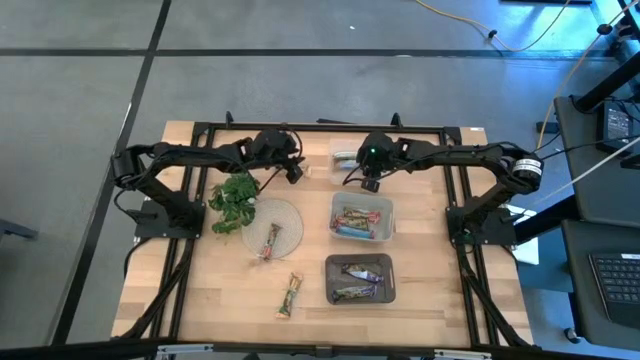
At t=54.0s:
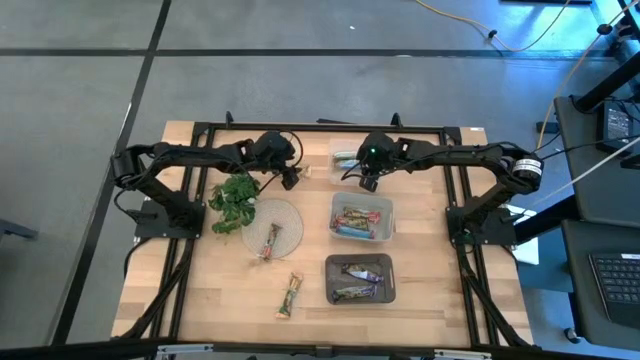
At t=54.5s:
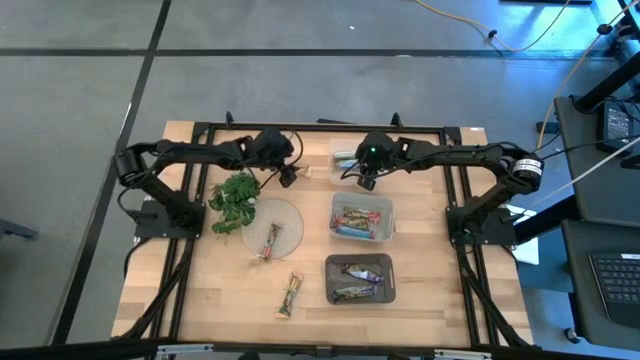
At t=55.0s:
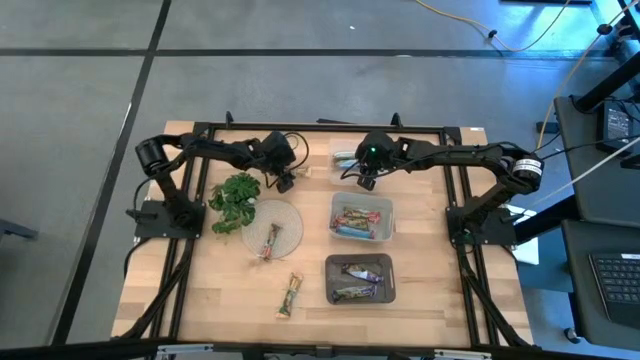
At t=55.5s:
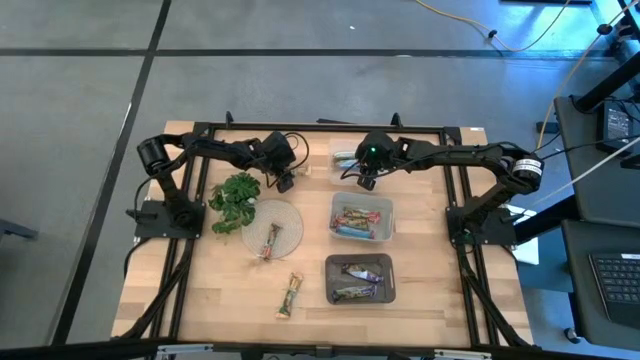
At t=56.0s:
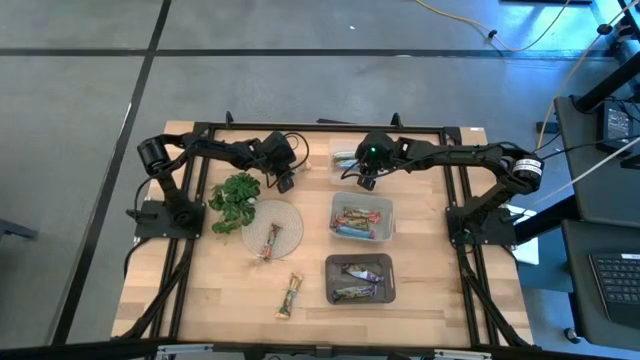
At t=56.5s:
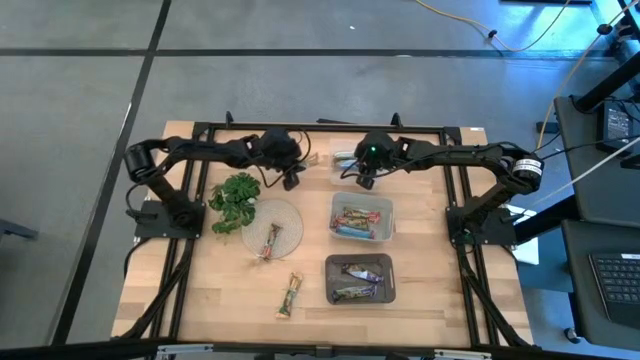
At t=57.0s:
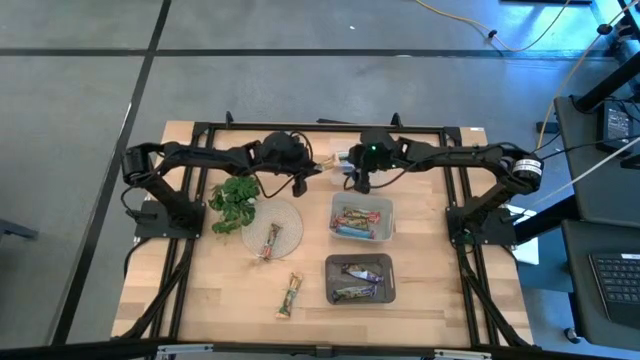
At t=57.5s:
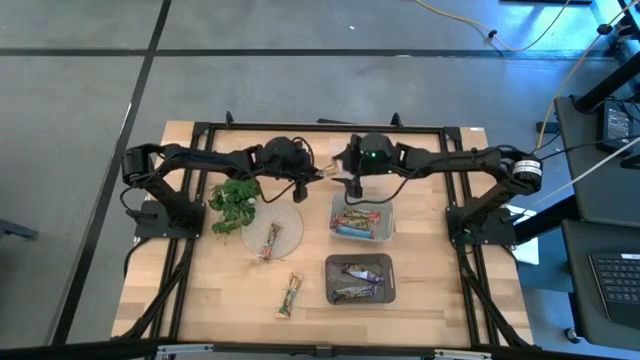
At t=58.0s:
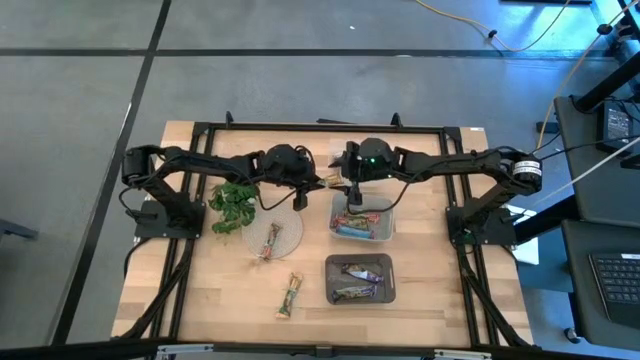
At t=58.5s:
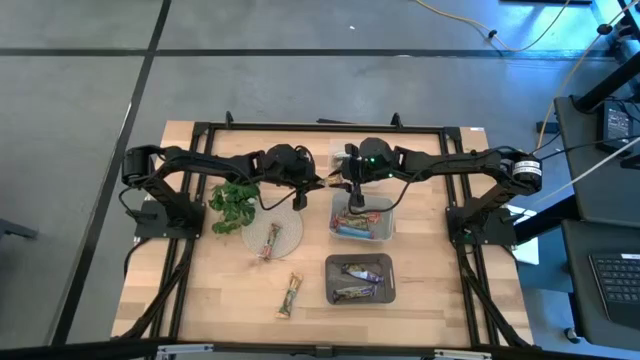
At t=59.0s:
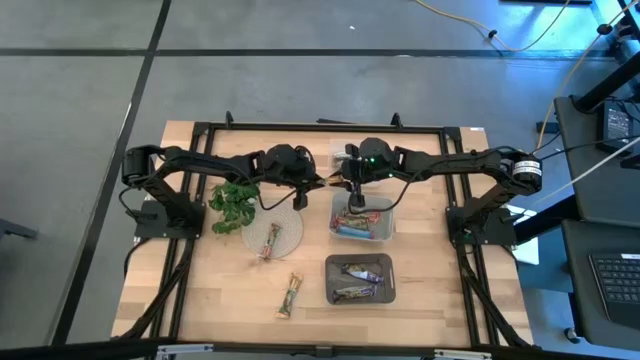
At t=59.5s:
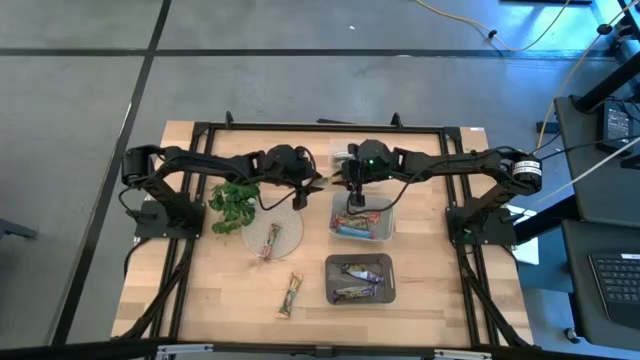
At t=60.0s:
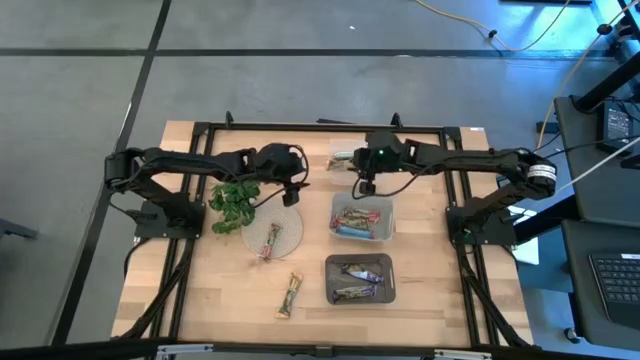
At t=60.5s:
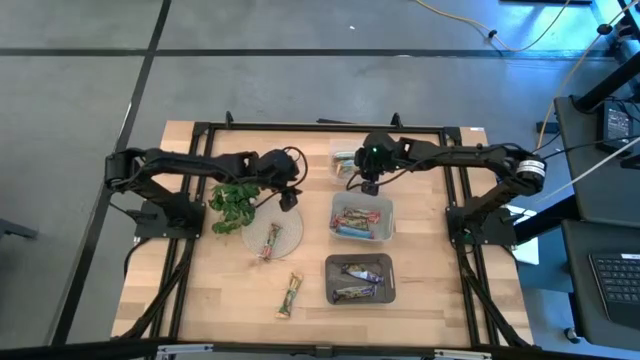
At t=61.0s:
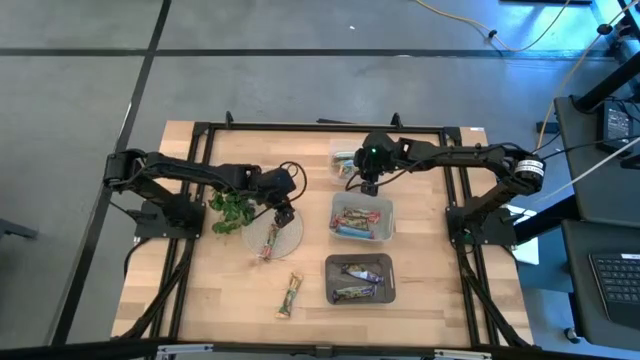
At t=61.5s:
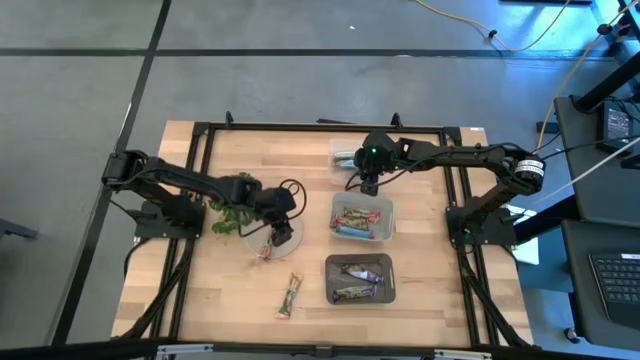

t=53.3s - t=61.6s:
Task: Pick and place Granola Bars by type
Put the yellow granola bar into the transparent bin

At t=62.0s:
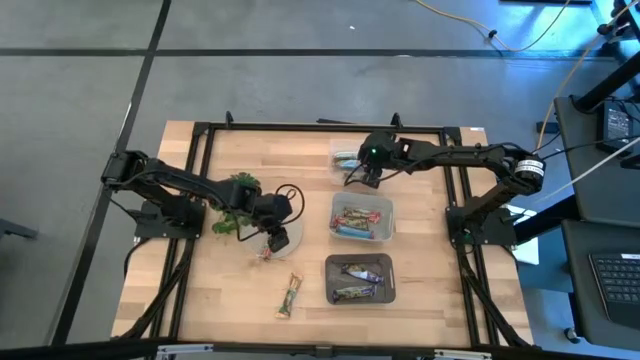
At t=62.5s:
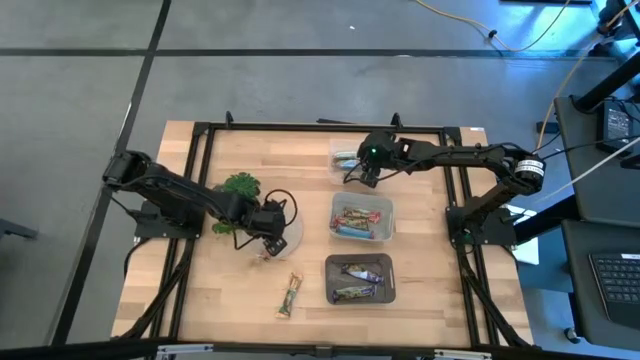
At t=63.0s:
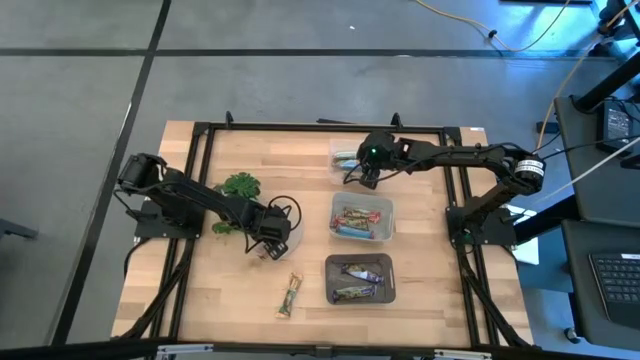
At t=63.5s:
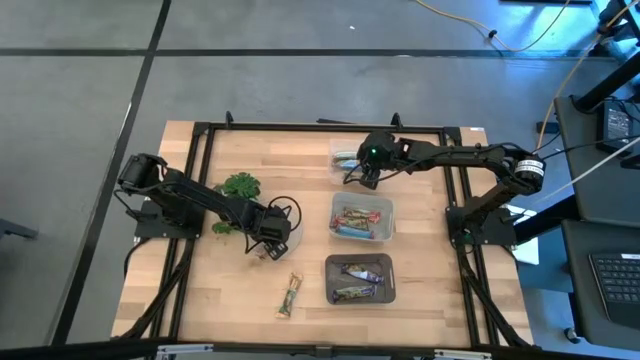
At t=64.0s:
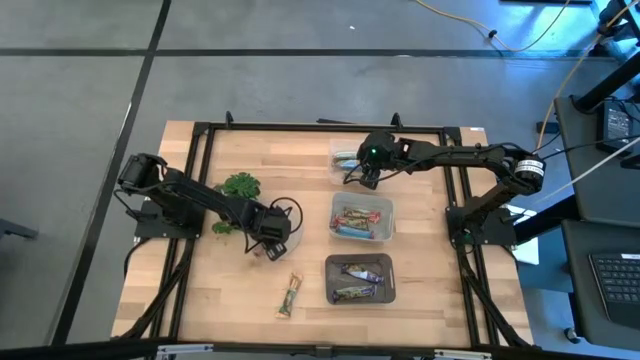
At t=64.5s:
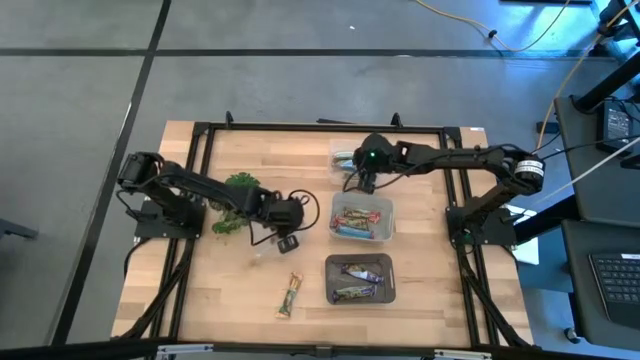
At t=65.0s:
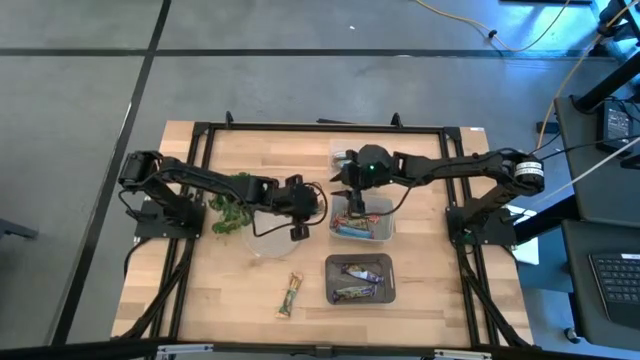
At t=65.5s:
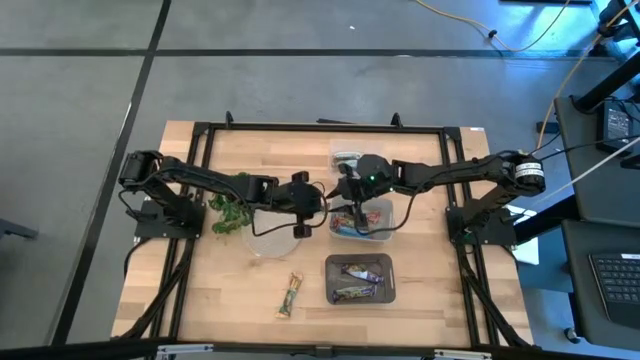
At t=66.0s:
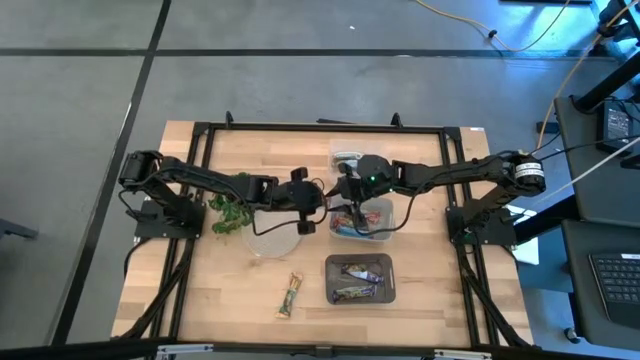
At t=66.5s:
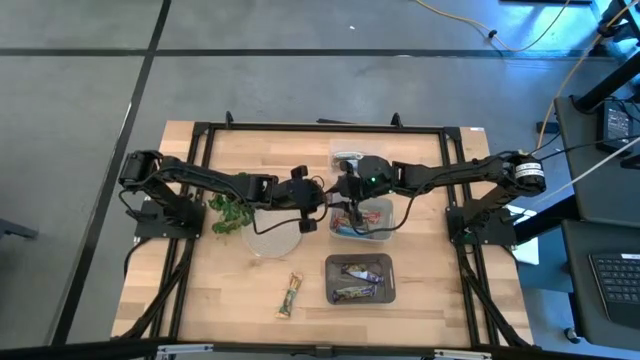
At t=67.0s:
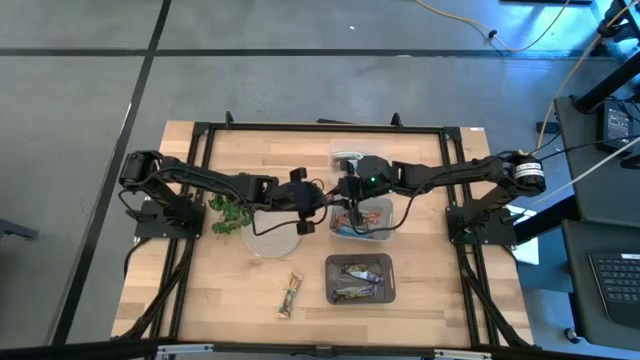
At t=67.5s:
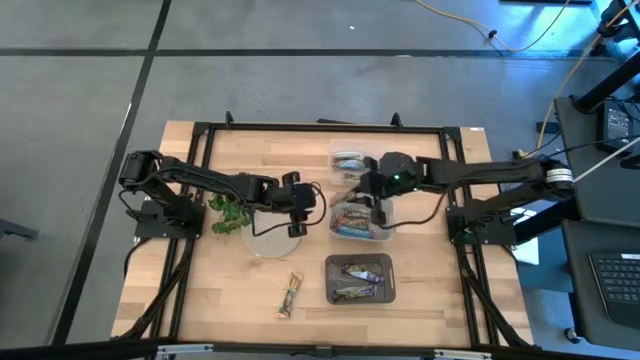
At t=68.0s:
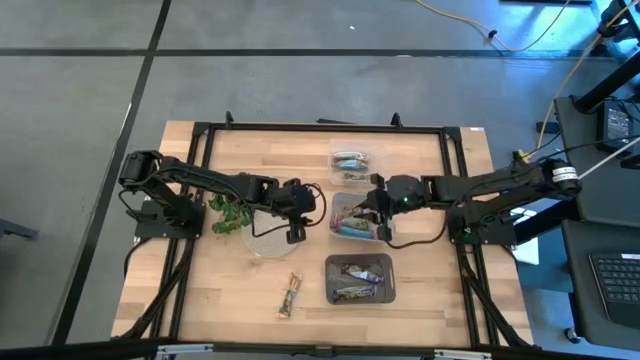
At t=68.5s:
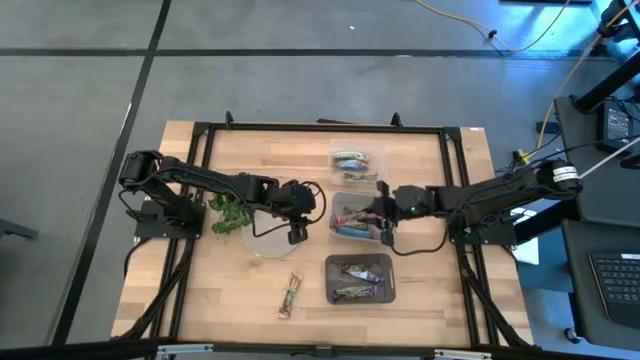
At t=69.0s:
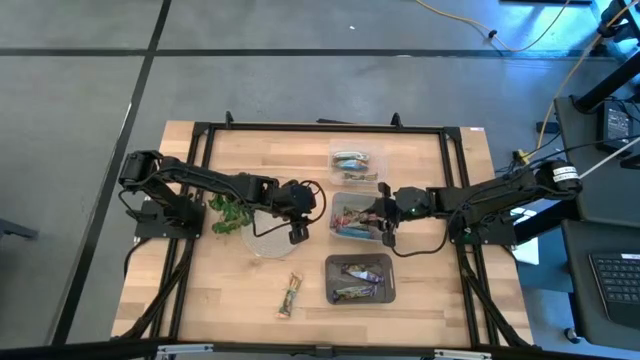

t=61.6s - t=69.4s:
Put the red granola bar into the gray bin

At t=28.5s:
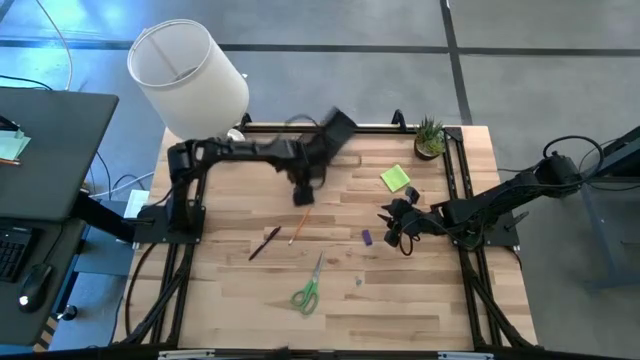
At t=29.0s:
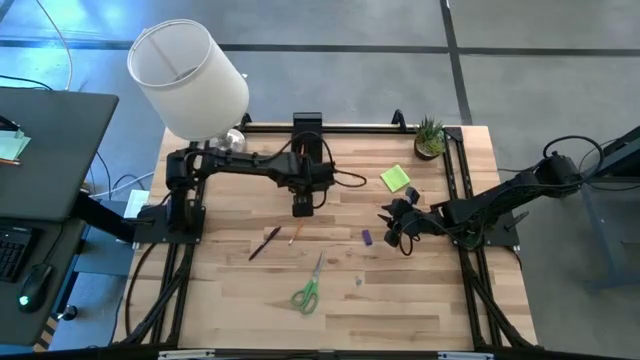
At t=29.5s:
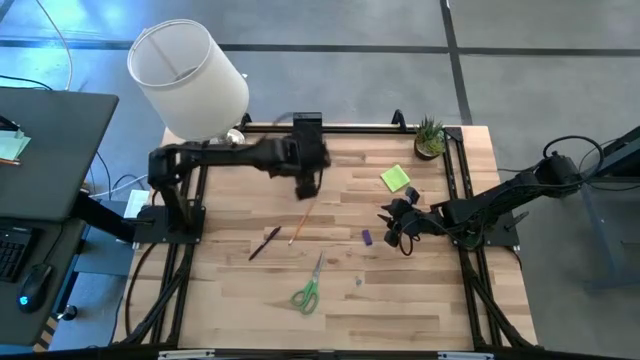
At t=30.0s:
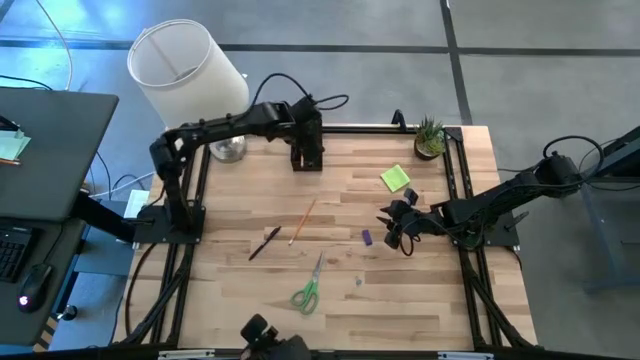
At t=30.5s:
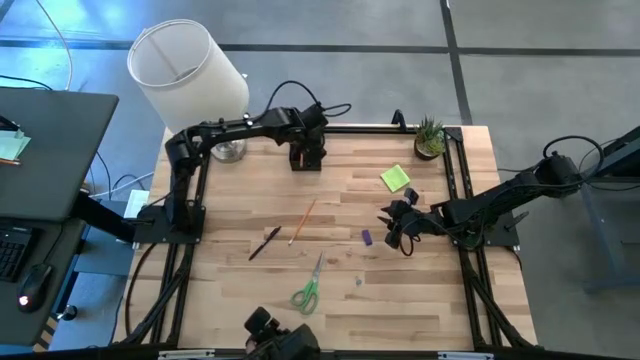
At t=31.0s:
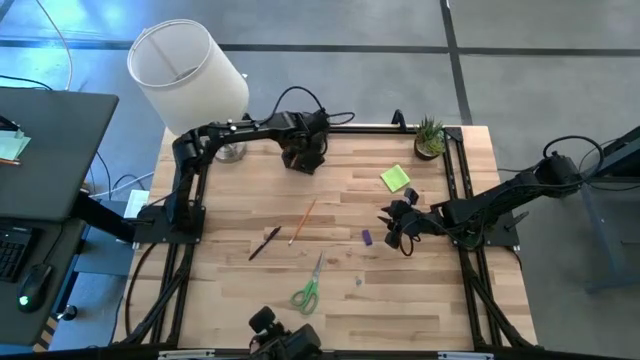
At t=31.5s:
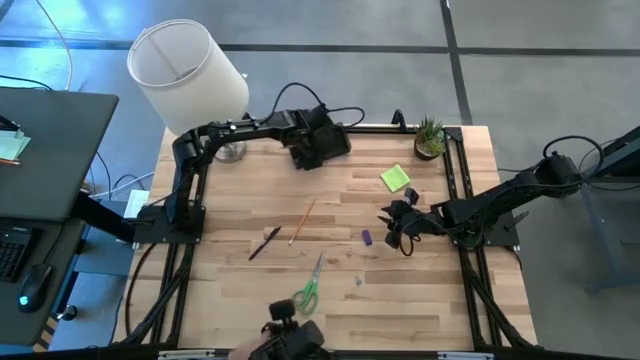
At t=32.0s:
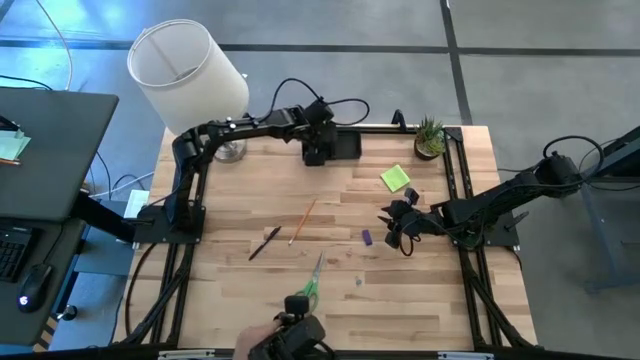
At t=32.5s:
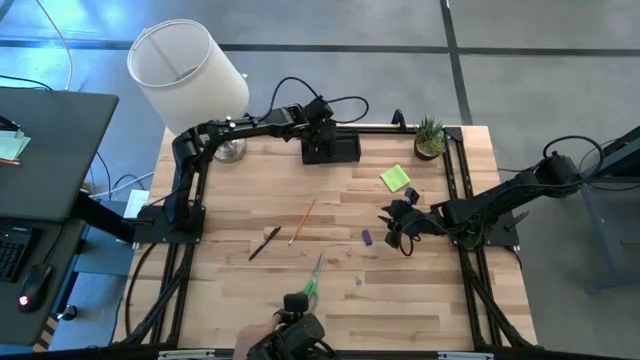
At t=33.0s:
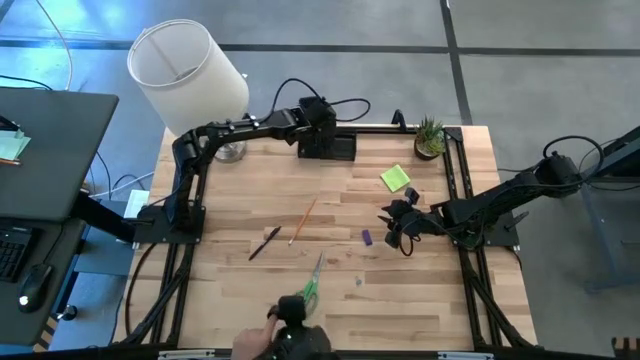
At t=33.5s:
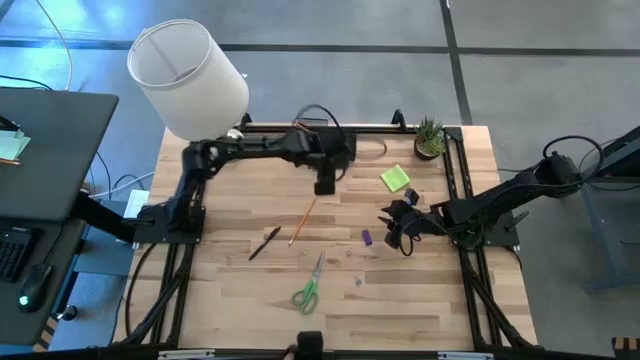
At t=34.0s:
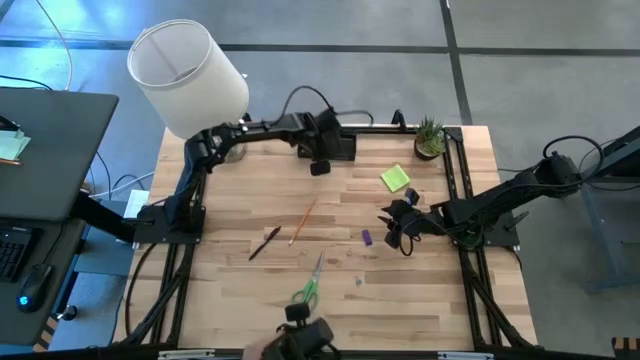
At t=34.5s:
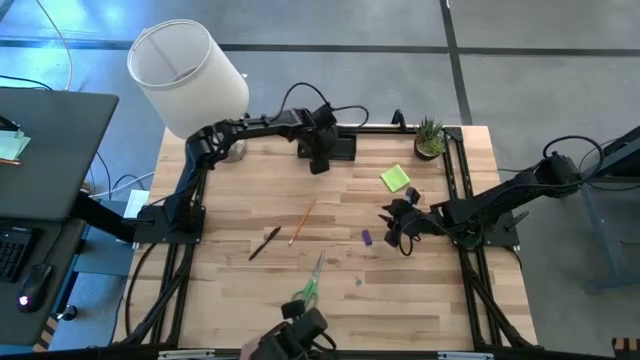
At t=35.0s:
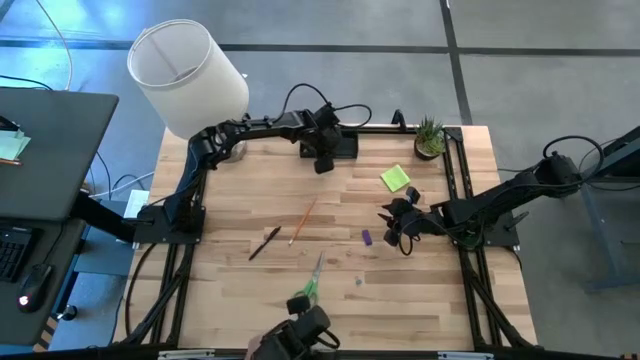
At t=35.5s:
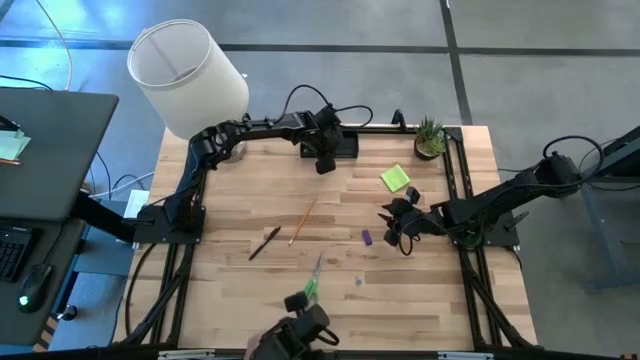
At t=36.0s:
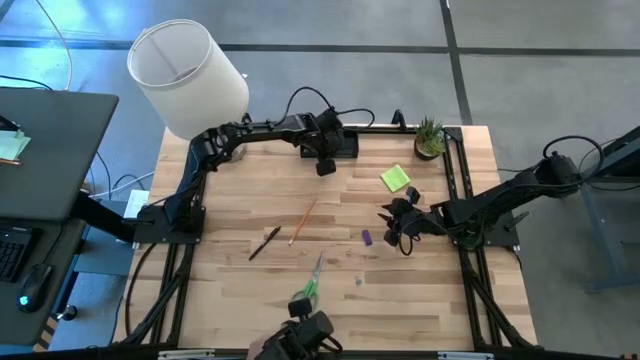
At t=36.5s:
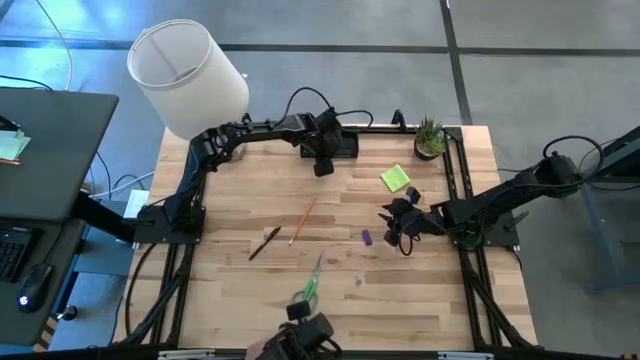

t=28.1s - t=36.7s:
Task: Pick and place office supplies into organizer
Adjust the black desk organizer
